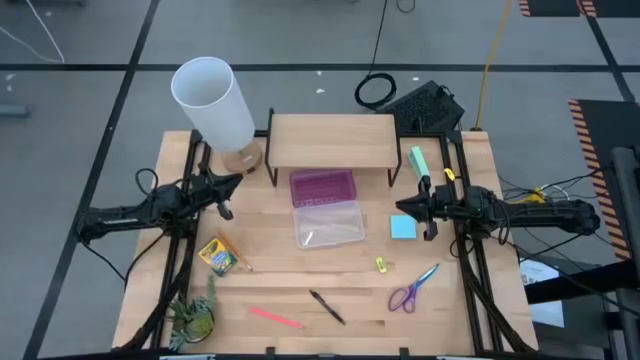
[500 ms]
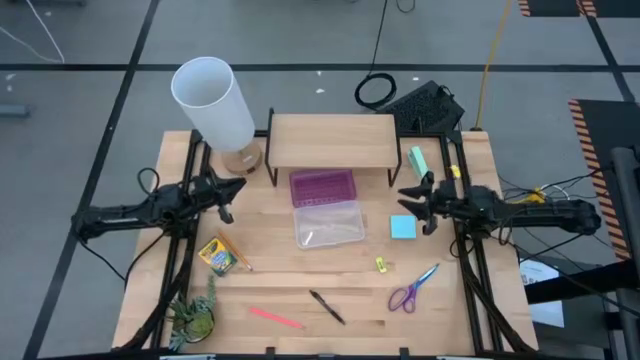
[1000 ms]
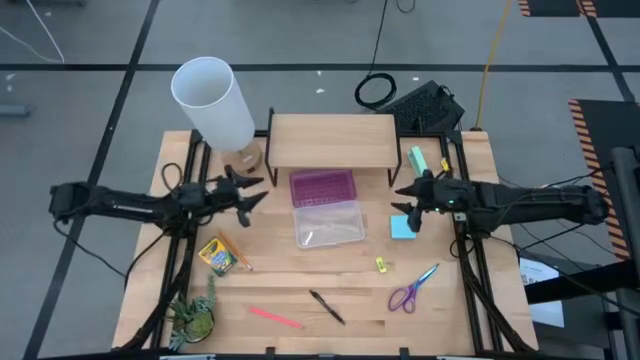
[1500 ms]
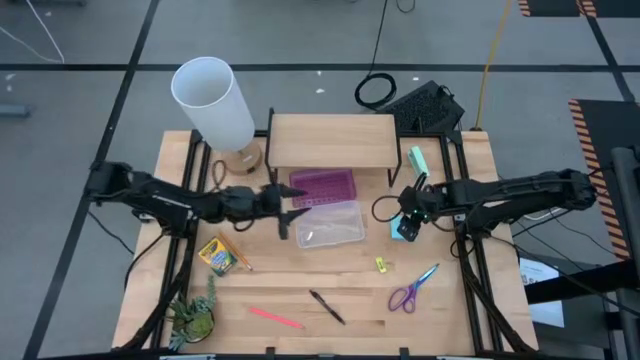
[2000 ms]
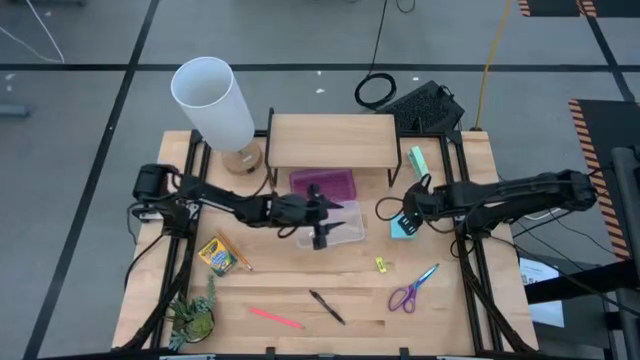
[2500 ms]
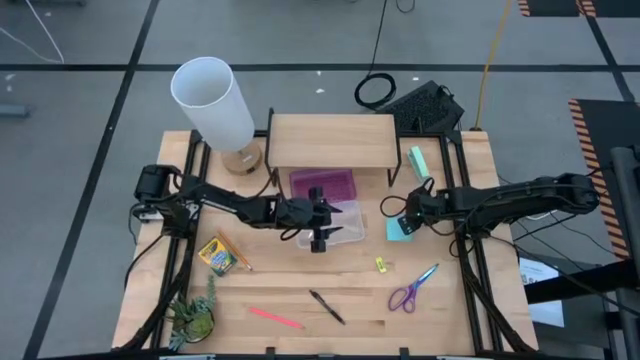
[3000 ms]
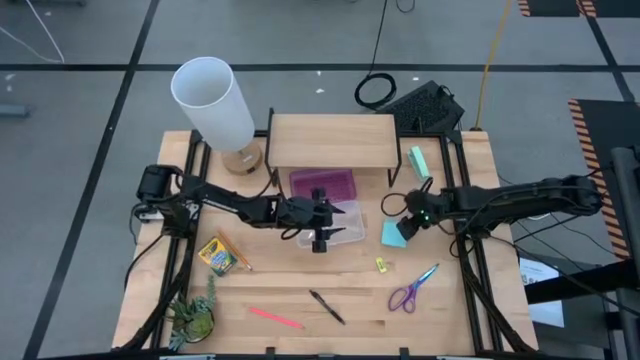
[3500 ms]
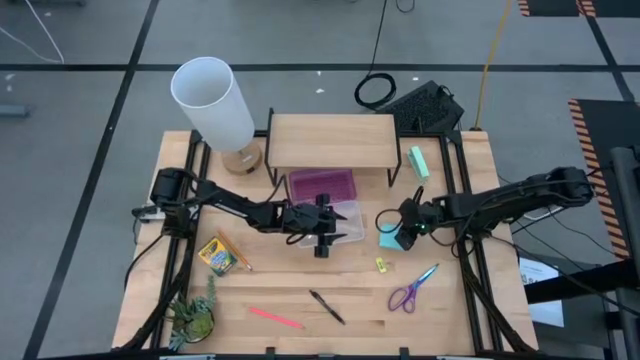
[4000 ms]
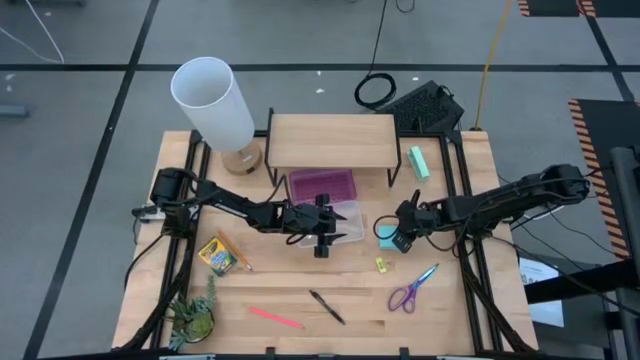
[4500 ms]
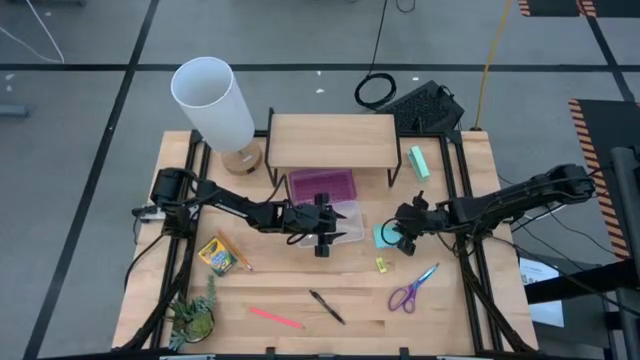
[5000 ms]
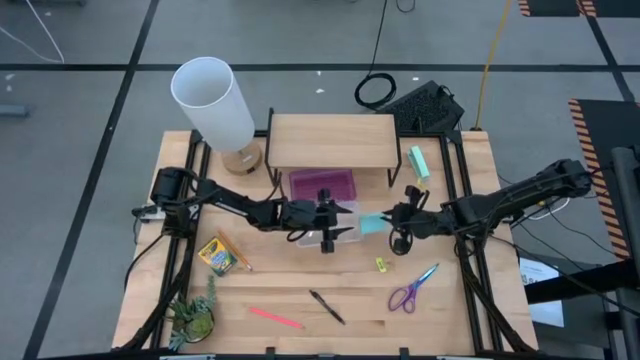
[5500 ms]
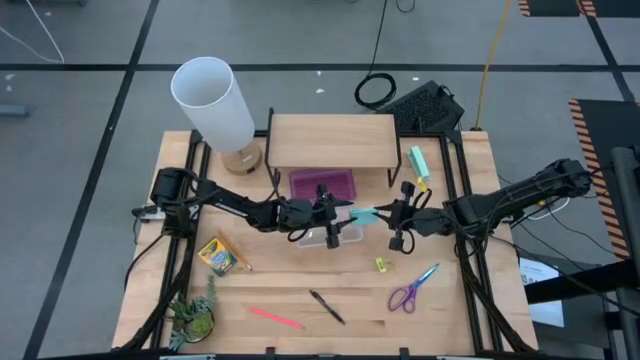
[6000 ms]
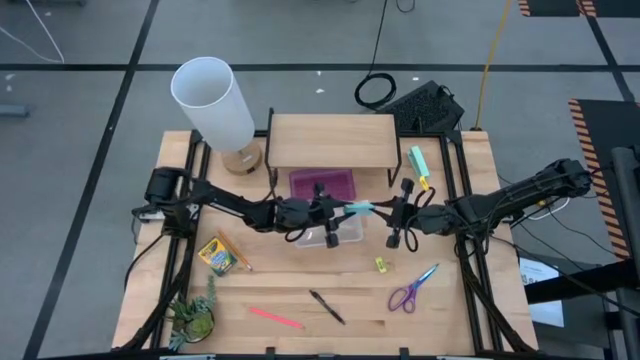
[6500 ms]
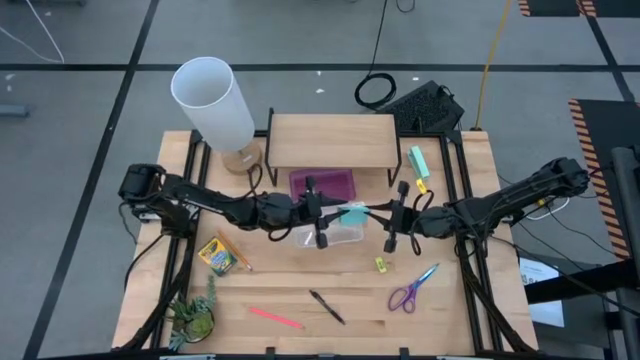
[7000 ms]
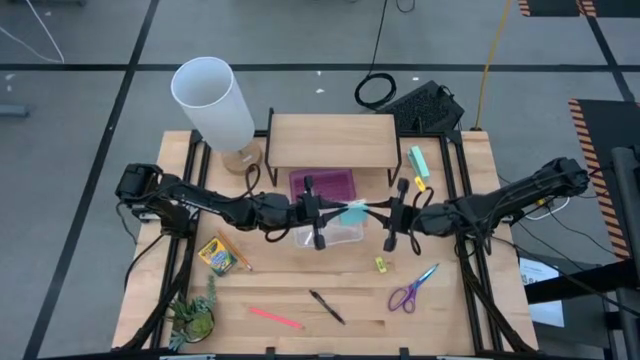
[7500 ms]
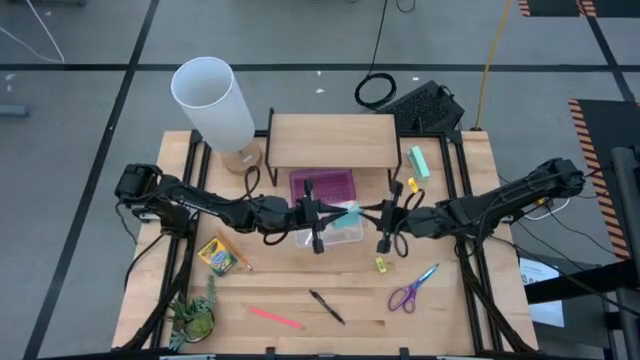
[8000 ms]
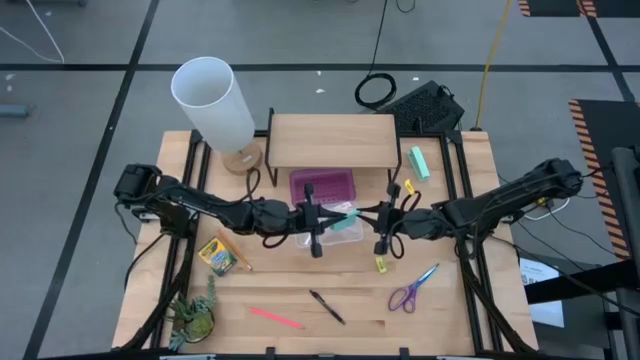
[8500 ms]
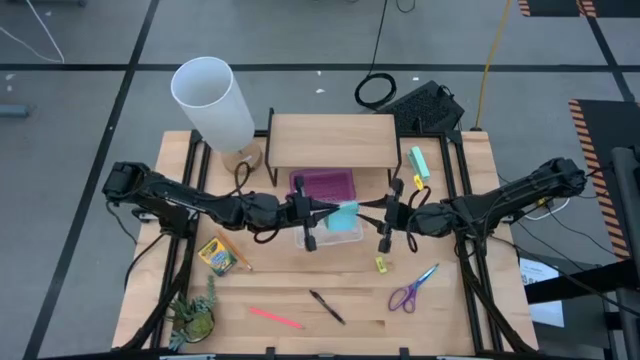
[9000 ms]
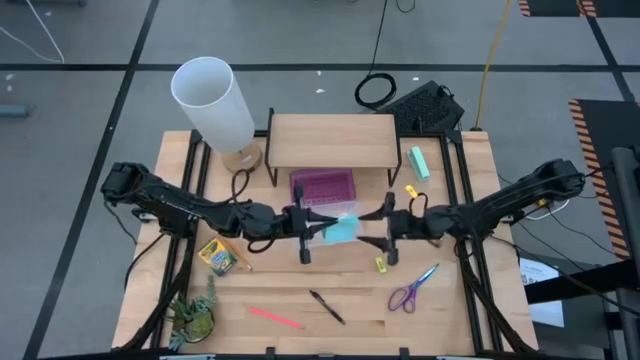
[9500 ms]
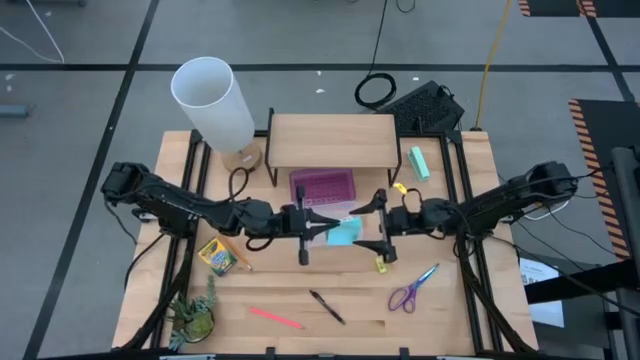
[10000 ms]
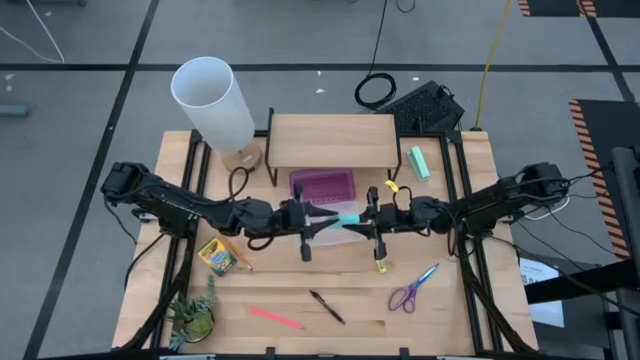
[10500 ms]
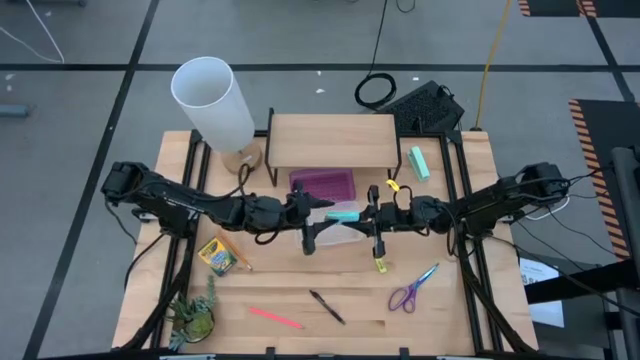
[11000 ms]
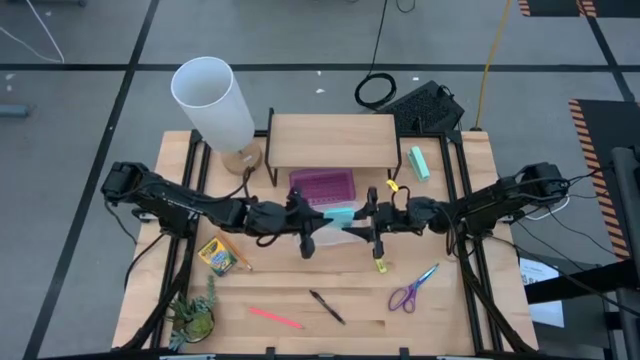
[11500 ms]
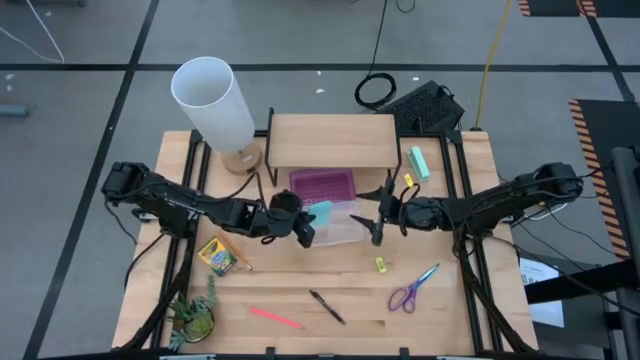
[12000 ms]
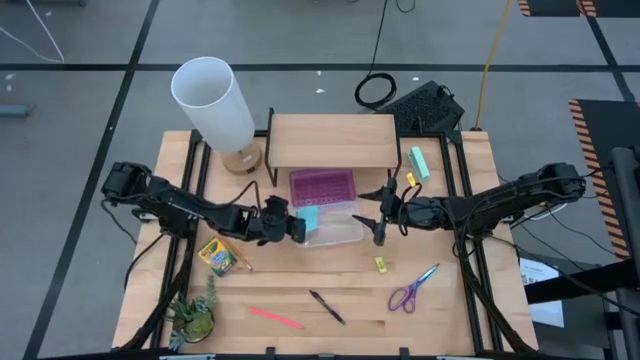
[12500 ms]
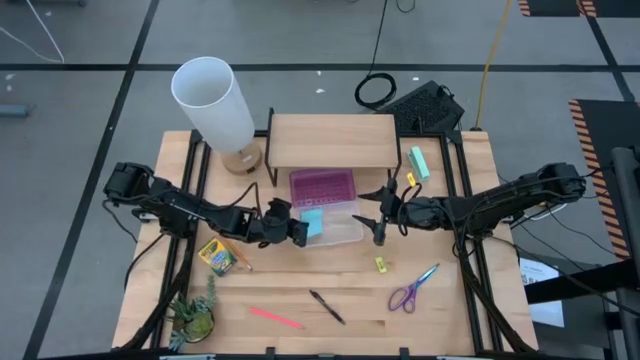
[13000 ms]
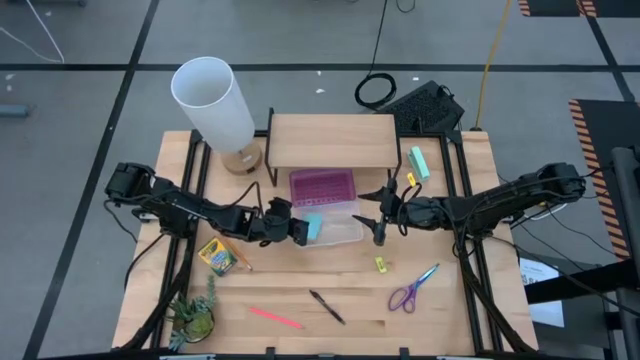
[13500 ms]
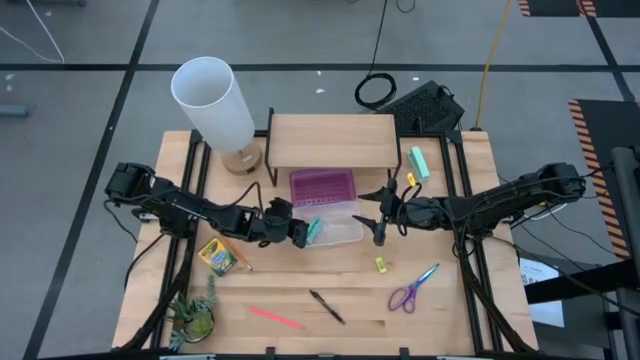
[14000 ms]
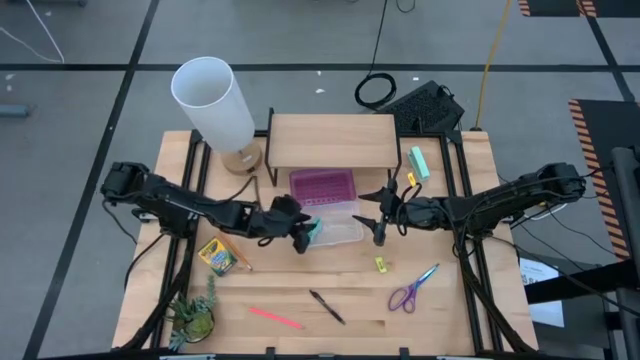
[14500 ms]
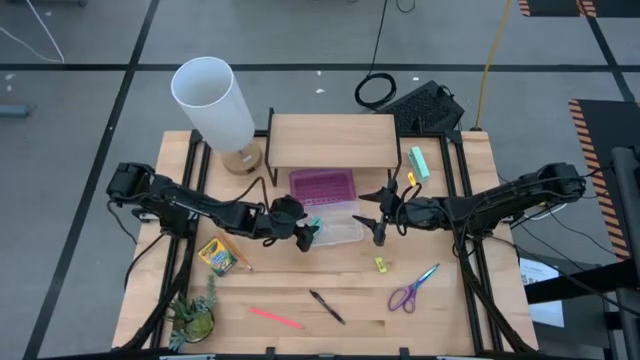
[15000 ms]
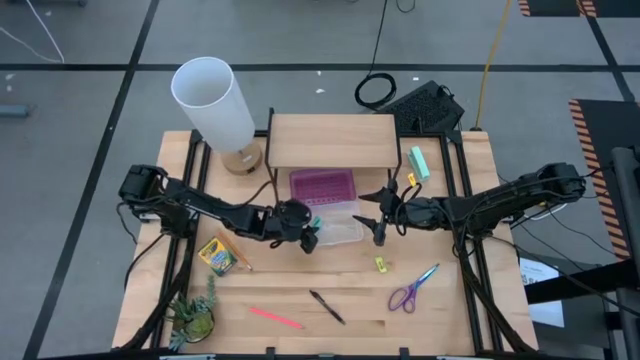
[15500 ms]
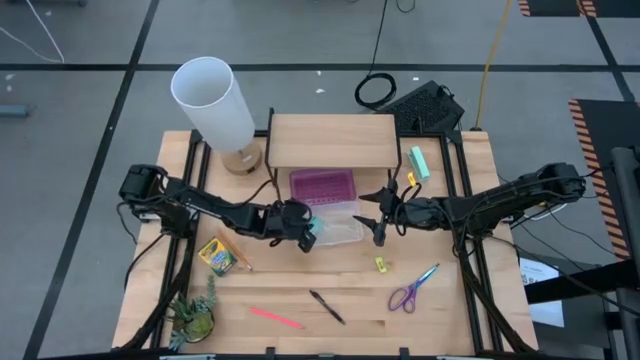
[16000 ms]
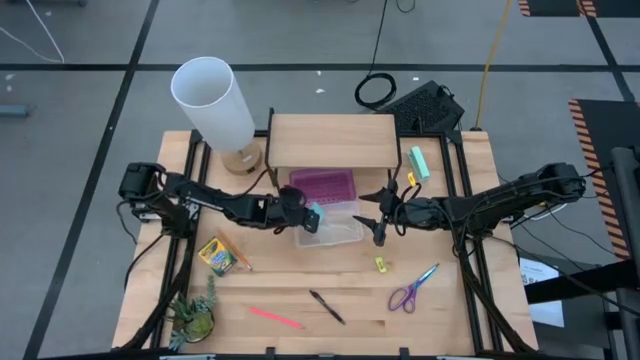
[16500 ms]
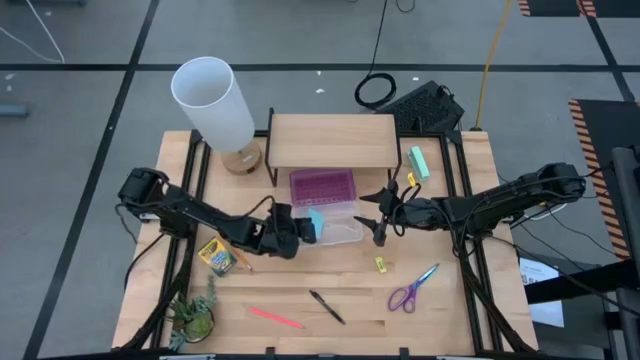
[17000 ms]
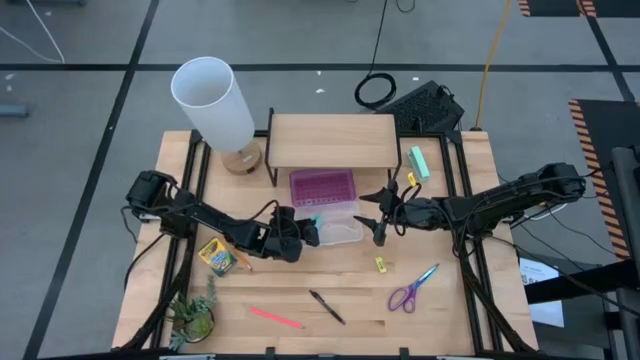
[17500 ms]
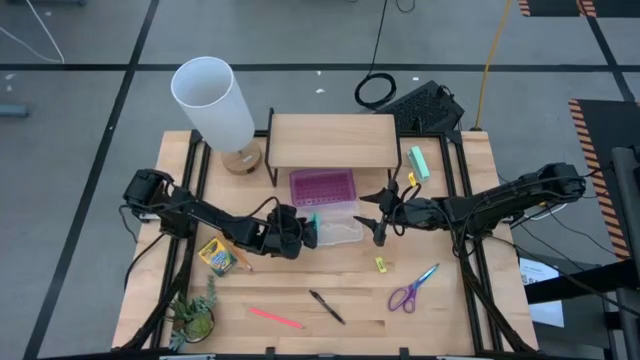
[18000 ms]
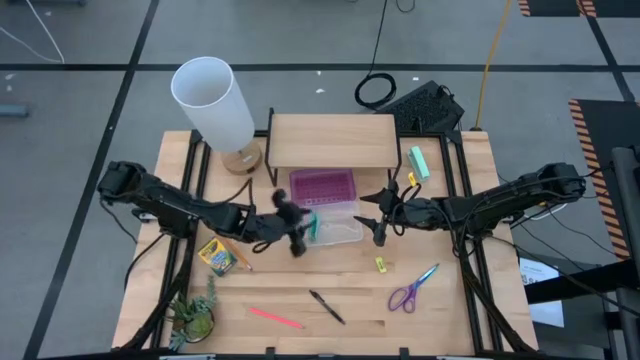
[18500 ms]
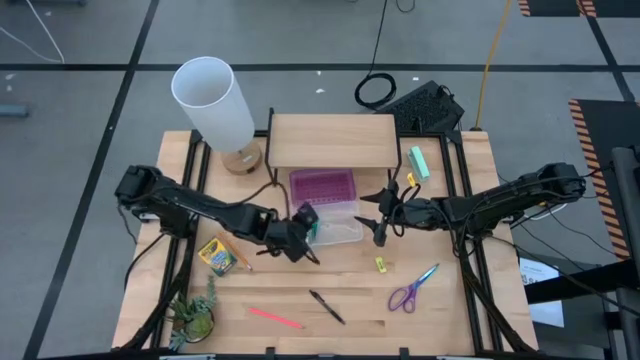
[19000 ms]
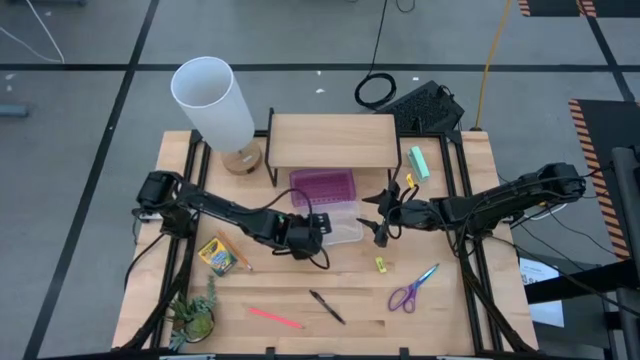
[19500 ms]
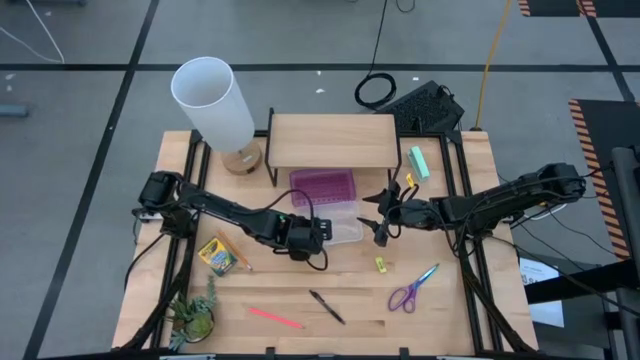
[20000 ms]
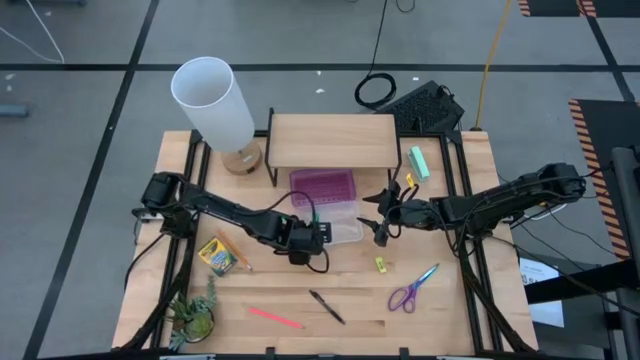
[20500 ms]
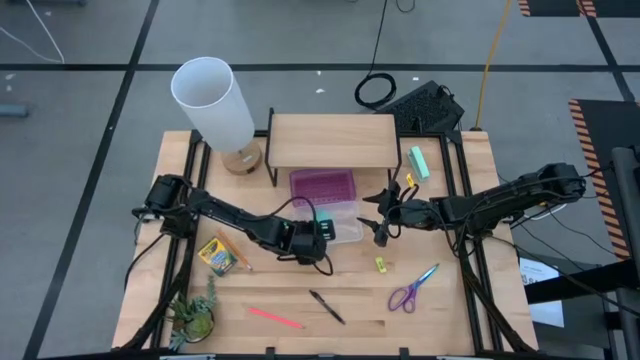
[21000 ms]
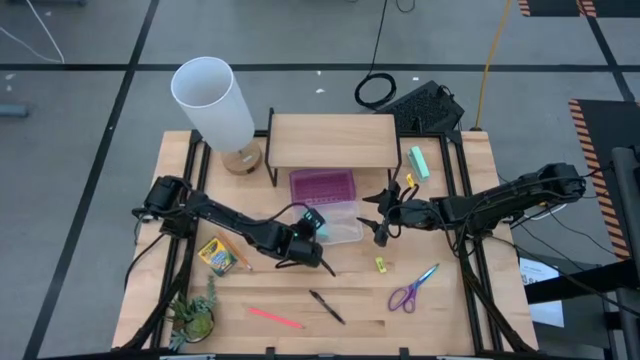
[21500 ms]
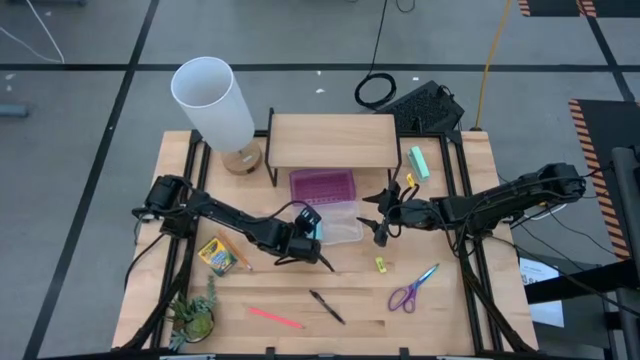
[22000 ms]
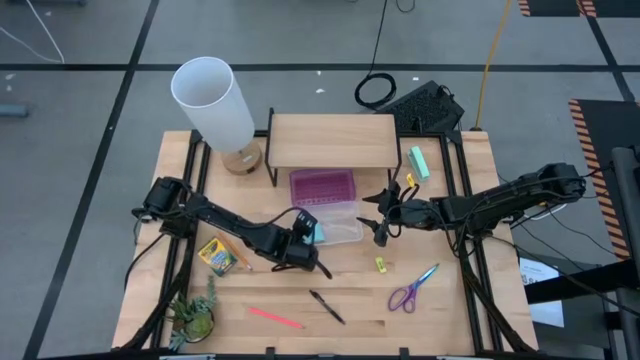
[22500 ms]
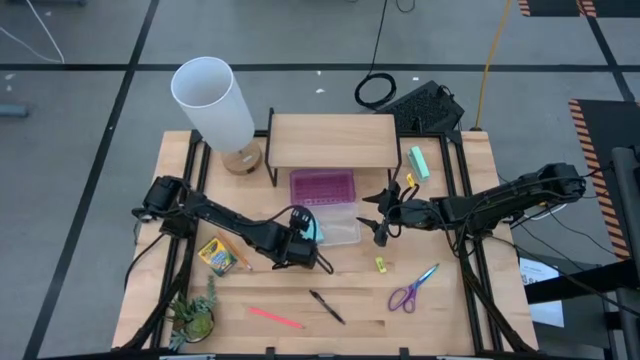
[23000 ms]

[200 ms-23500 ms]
Task: Pack school essentials
Put the blue sticky notes into the violet supply box
